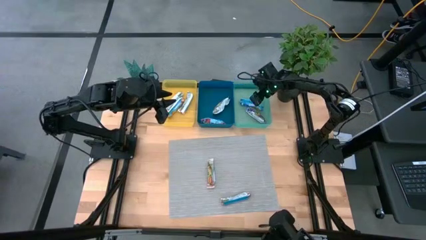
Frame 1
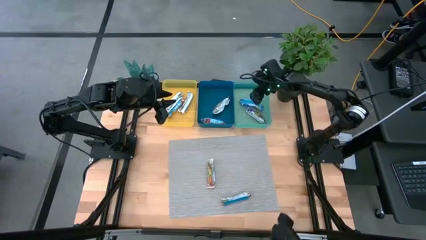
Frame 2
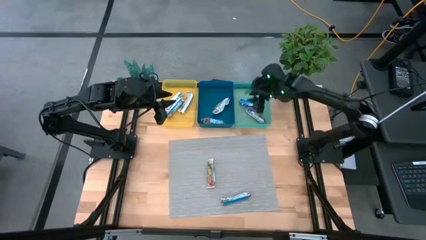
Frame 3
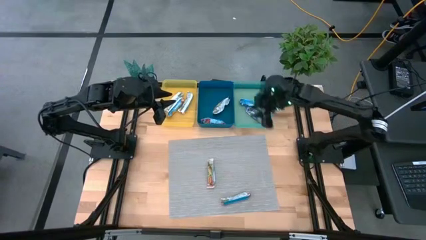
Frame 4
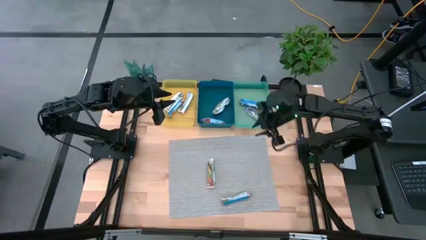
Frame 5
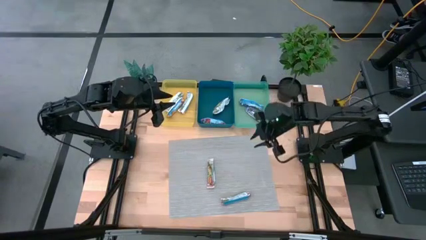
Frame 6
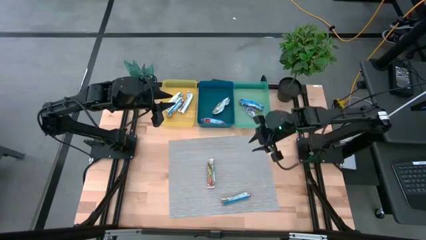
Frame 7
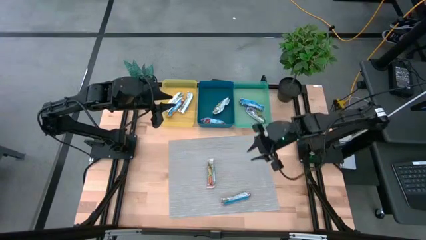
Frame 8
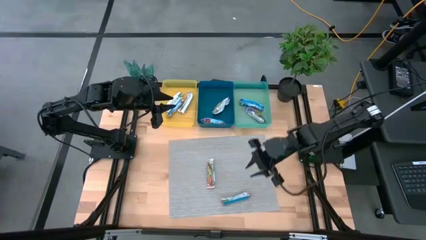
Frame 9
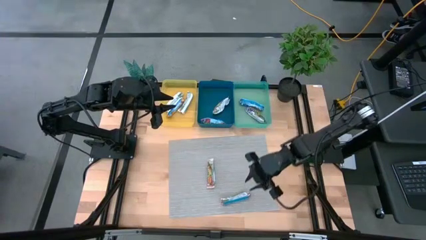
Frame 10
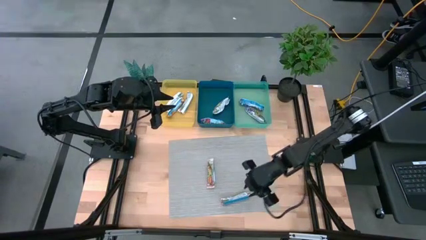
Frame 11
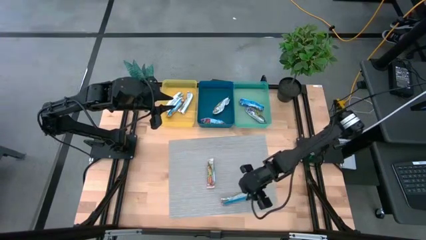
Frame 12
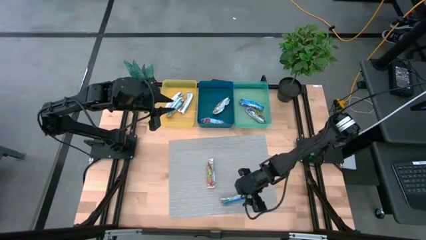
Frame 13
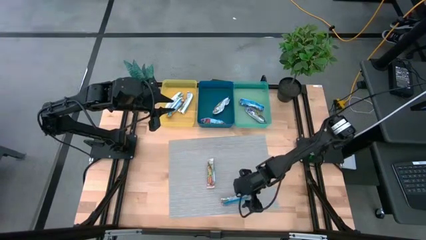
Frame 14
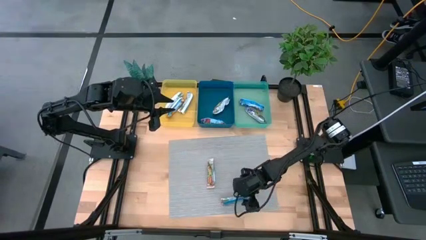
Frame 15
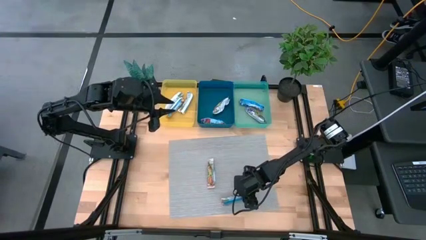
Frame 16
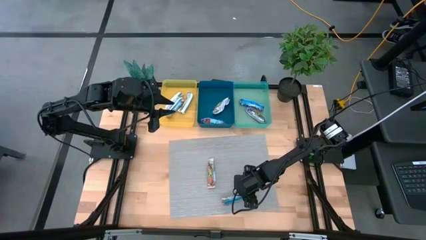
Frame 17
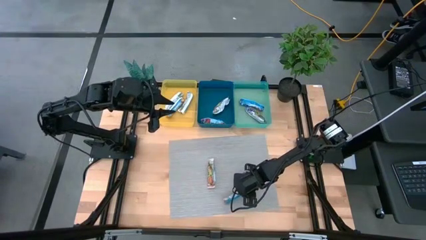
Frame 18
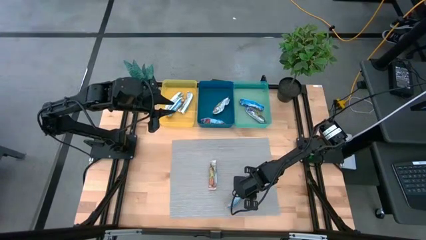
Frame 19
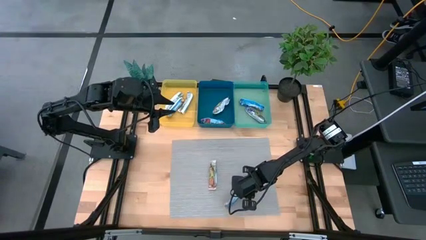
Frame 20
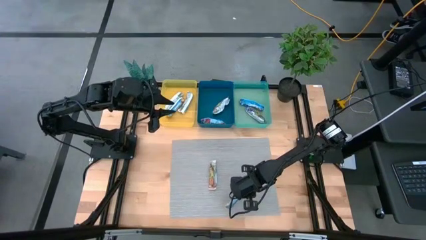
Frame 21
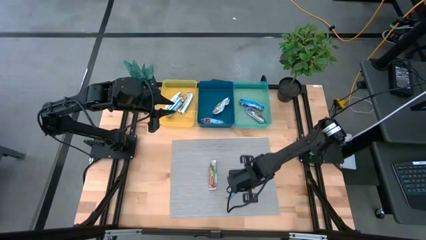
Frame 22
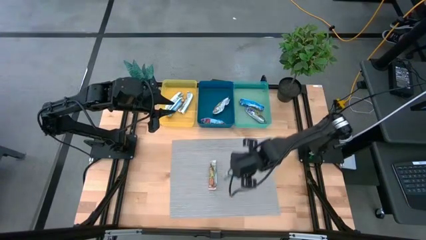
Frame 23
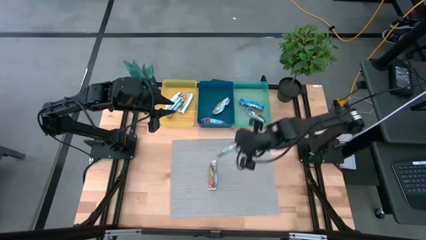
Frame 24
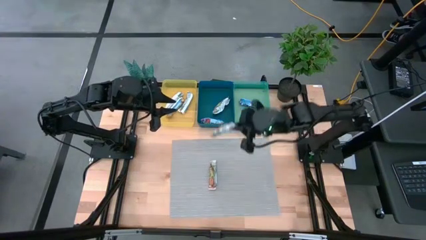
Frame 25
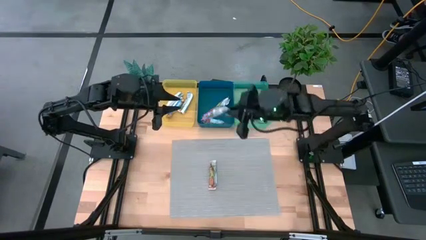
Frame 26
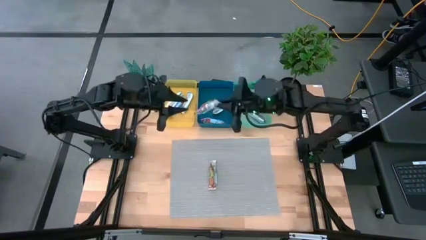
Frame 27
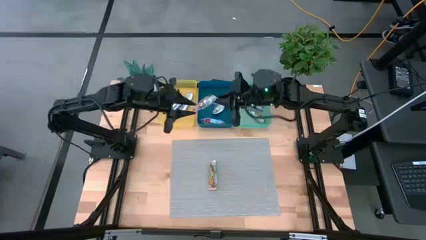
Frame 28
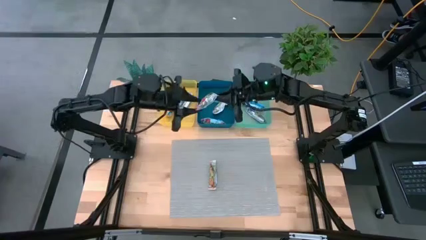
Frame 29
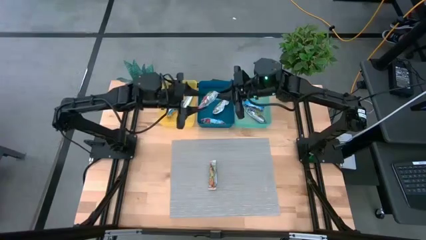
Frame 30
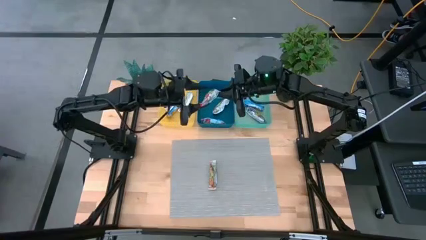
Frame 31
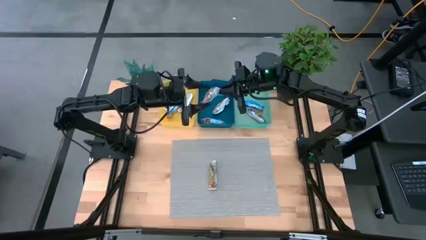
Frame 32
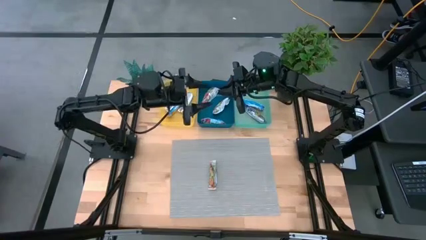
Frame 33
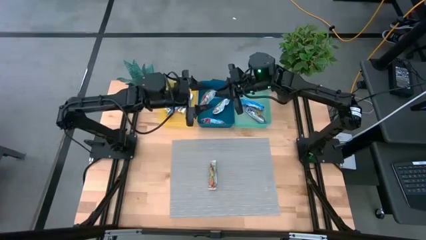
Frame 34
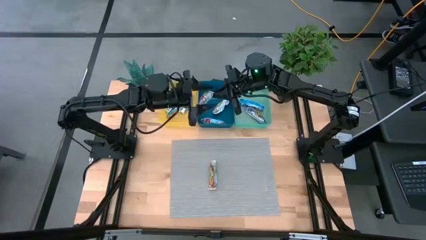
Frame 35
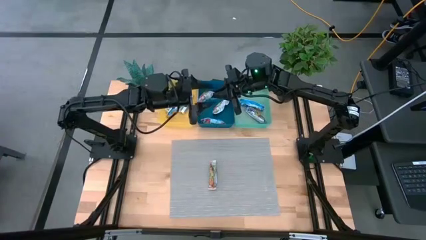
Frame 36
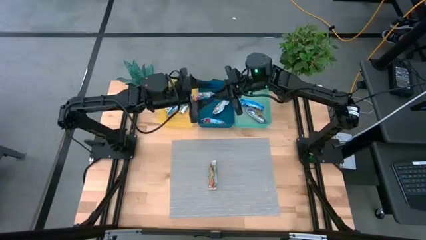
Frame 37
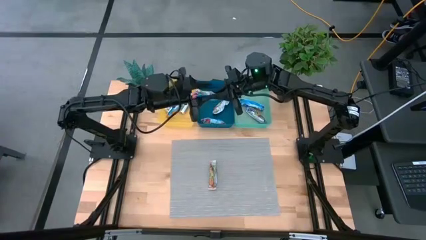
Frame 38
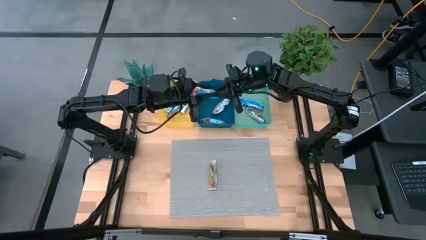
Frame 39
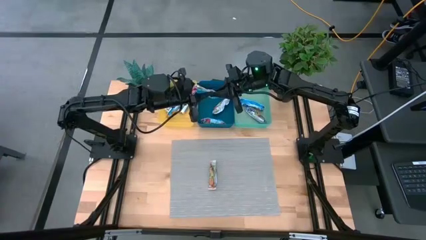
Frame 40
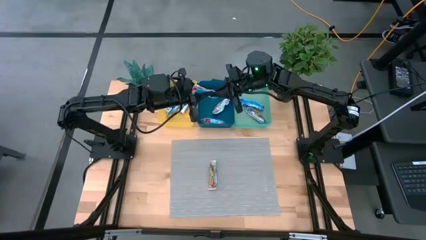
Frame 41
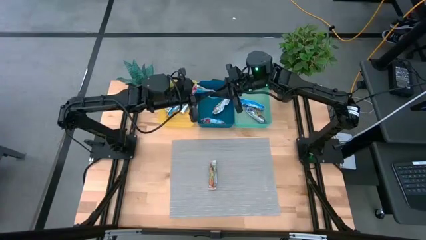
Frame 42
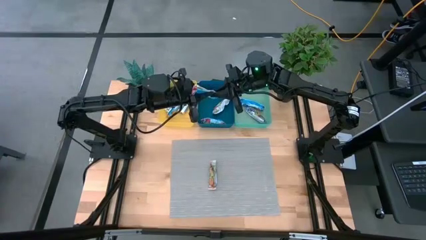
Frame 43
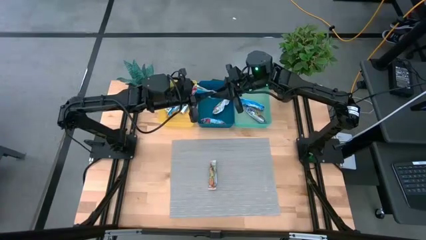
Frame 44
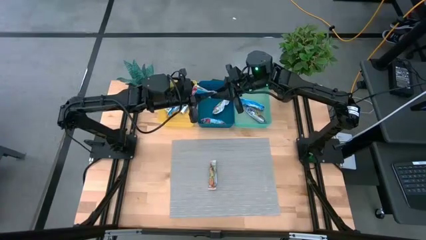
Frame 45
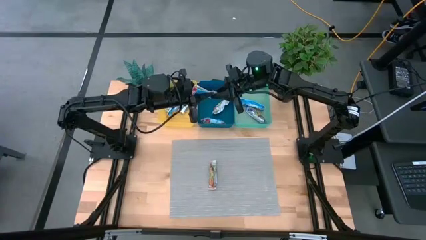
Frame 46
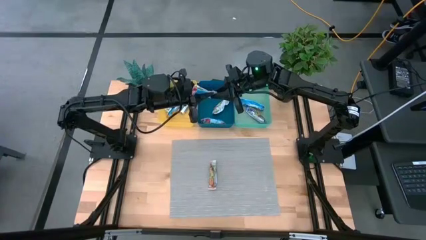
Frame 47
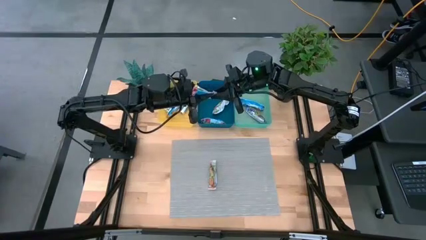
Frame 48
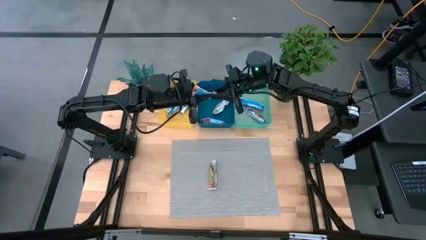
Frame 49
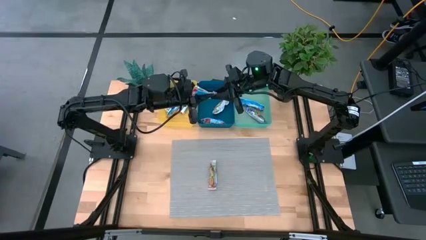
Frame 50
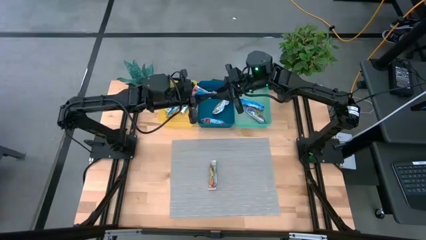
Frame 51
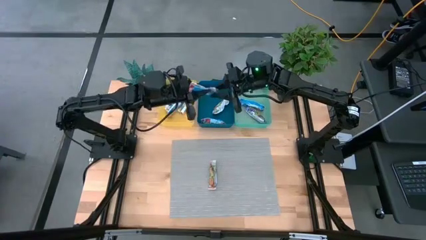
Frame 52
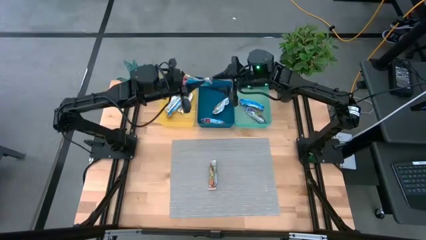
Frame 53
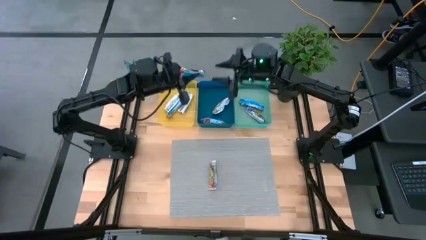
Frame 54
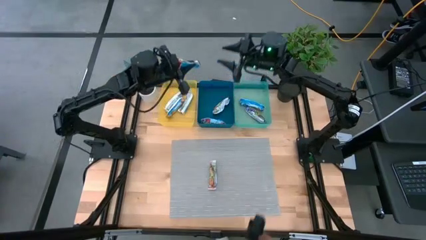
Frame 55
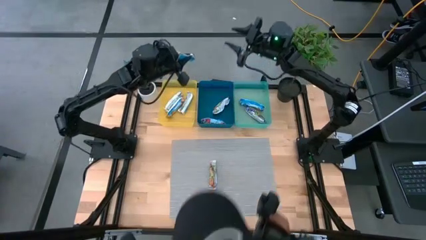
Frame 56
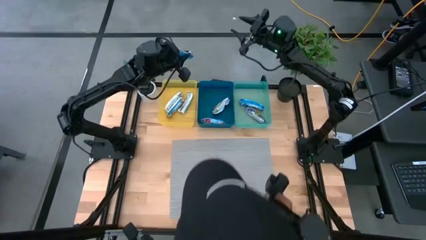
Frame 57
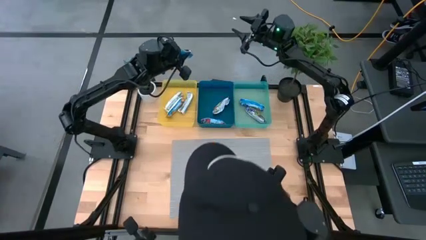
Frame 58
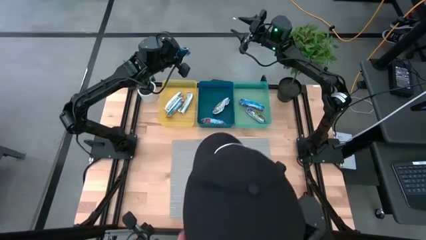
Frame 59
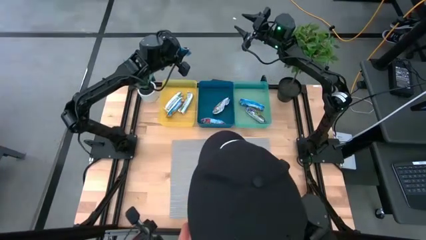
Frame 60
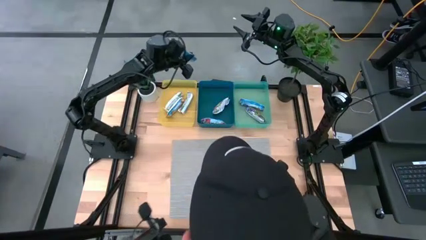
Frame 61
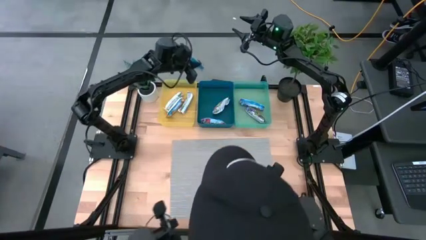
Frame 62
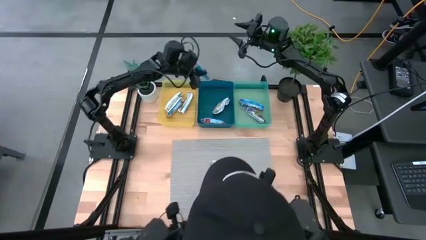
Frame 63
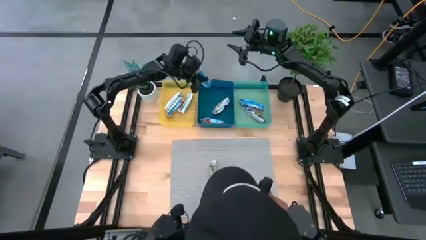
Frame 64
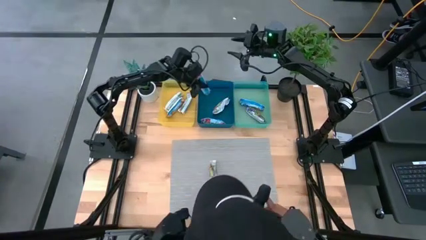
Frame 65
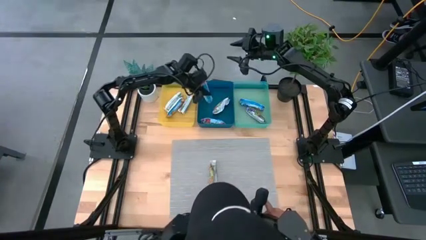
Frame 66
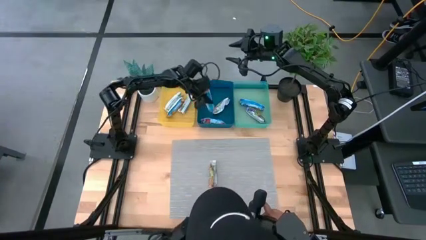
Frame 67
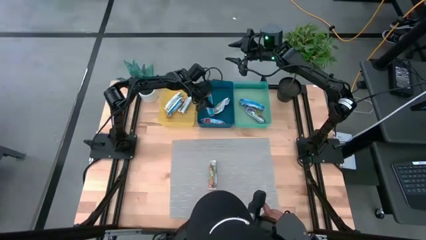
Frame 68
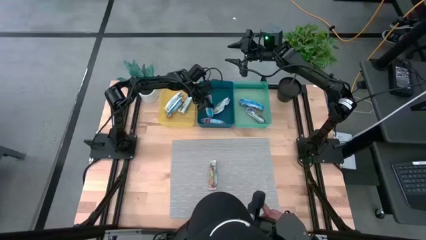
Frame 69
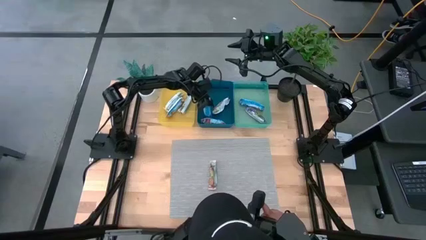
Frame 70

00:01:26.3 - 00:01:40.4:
Task: Pick and place Granola Bars by type
Put the red granola bar into the blue bin
